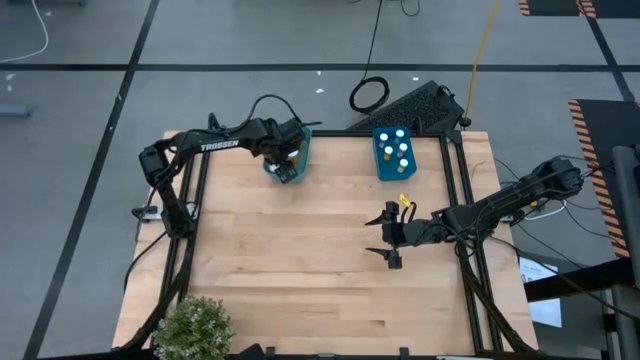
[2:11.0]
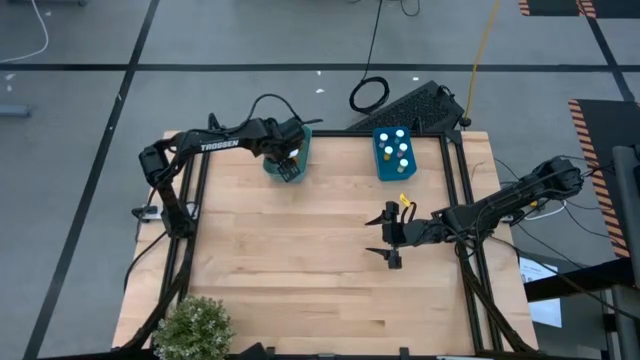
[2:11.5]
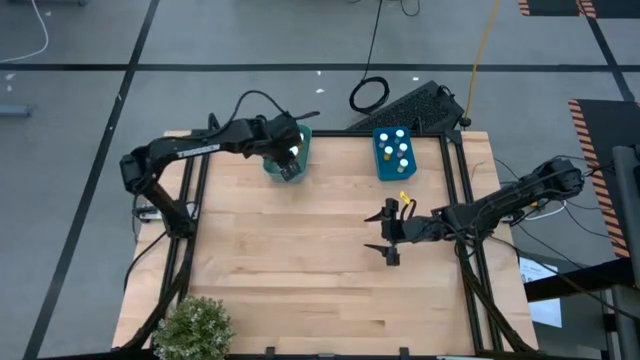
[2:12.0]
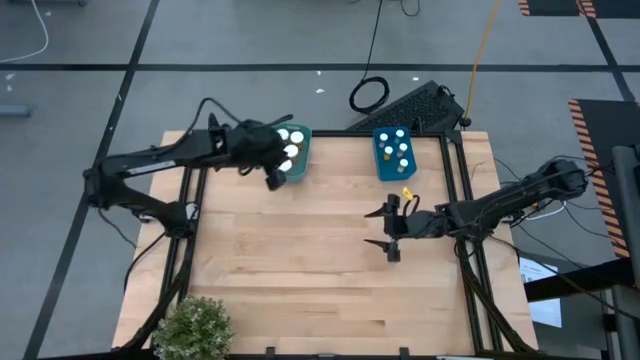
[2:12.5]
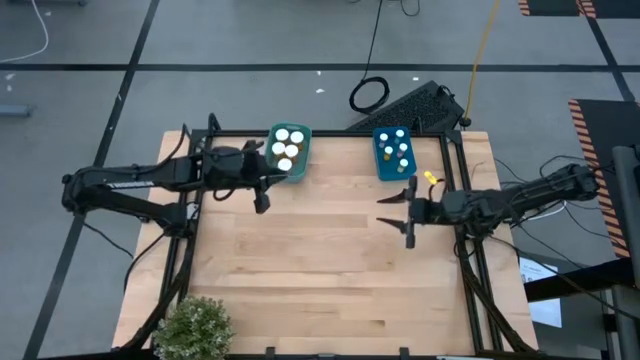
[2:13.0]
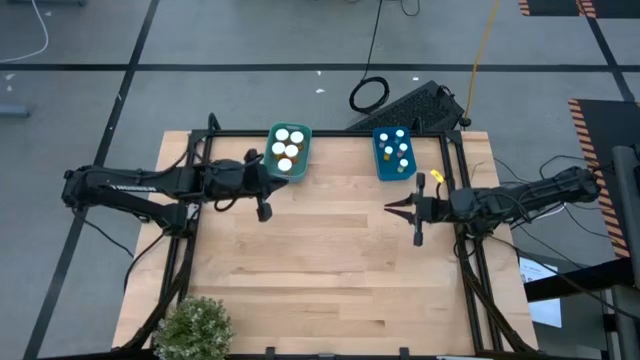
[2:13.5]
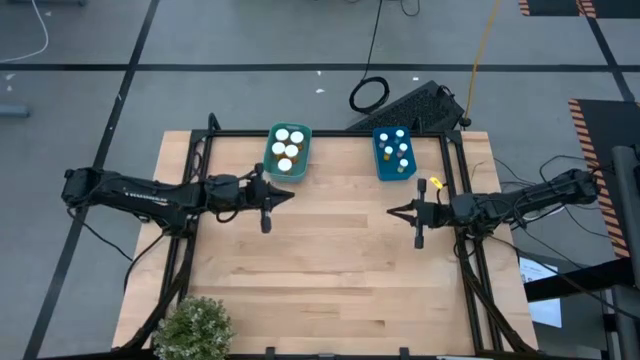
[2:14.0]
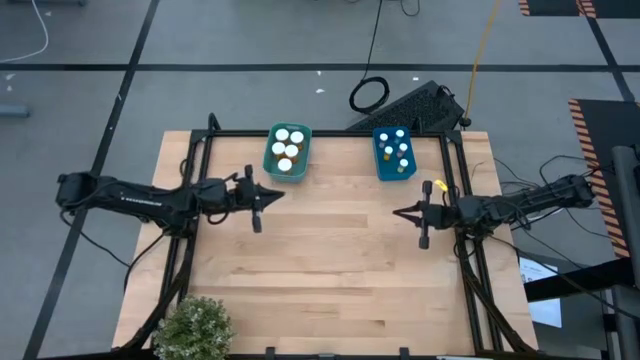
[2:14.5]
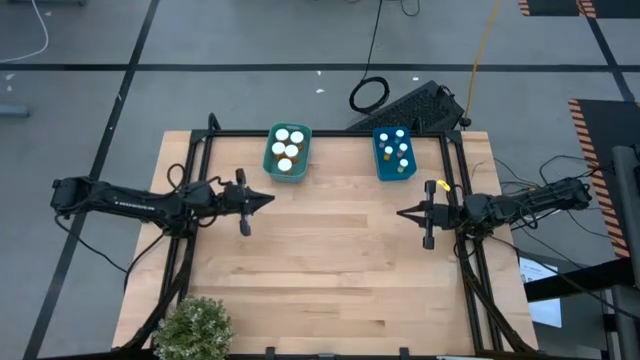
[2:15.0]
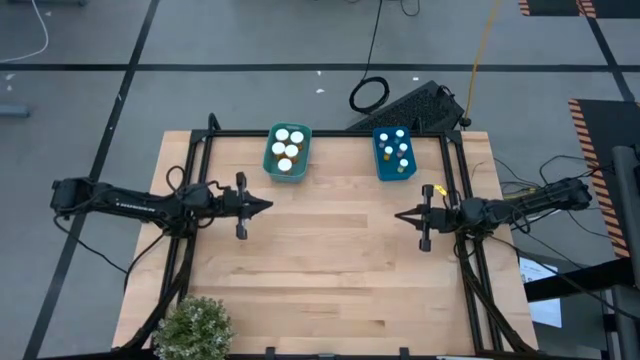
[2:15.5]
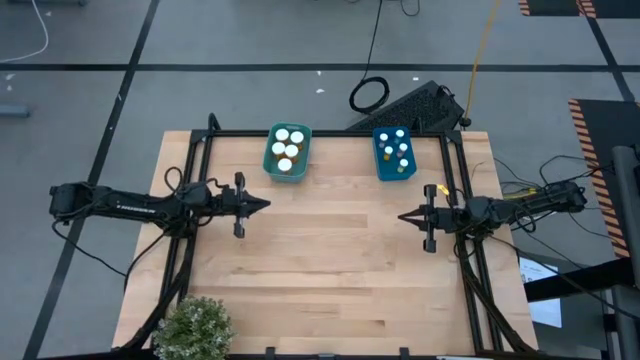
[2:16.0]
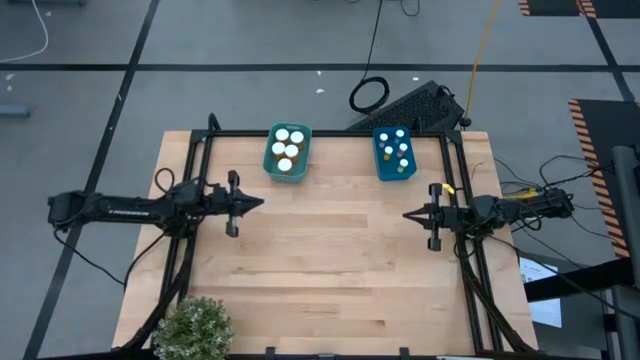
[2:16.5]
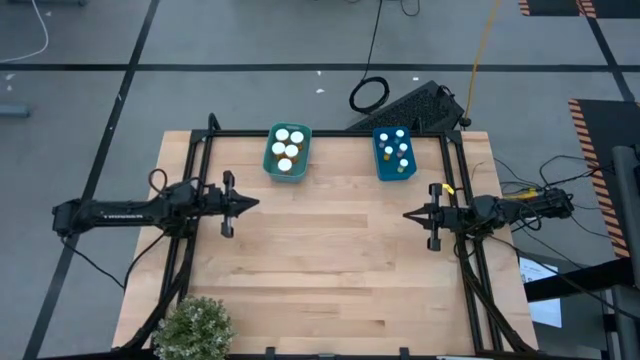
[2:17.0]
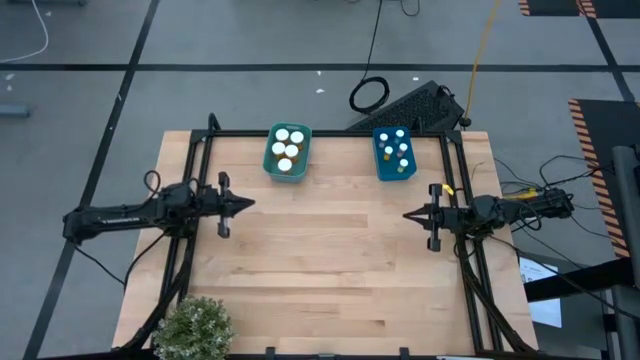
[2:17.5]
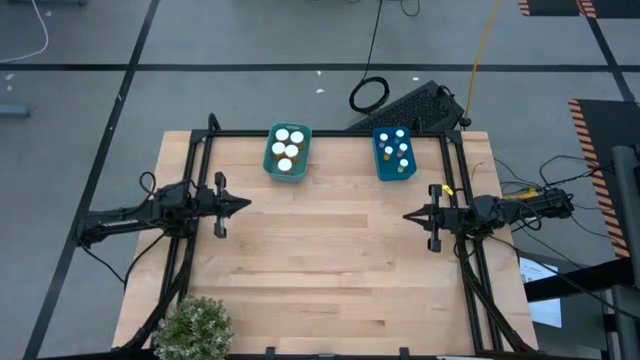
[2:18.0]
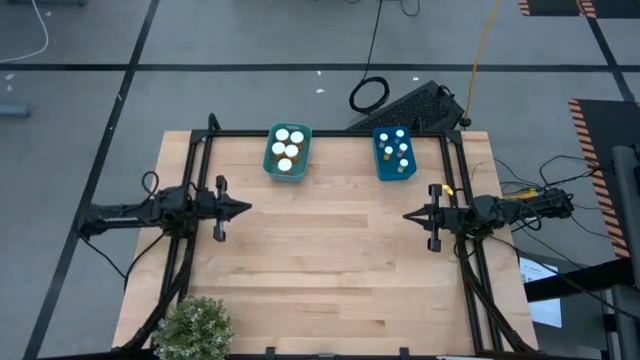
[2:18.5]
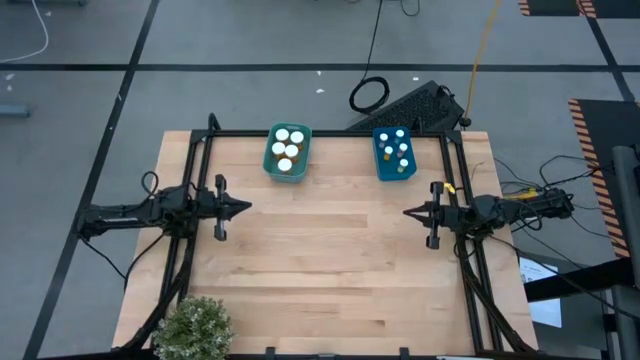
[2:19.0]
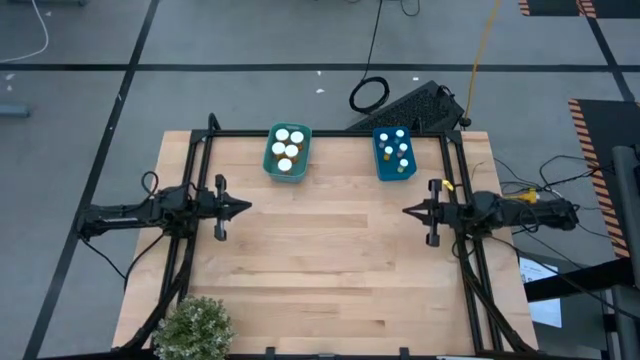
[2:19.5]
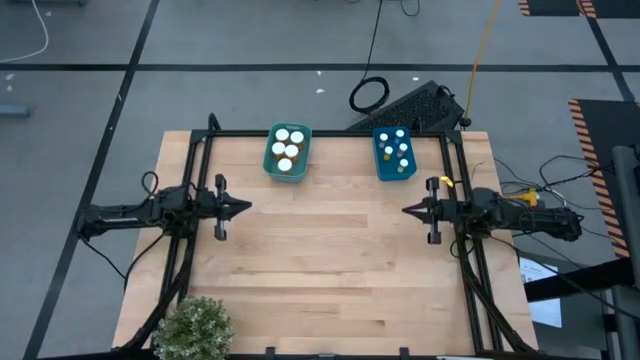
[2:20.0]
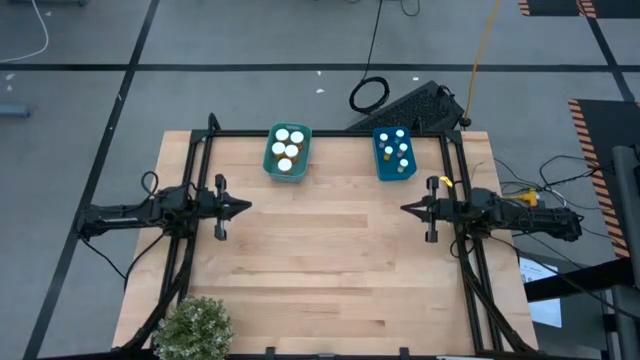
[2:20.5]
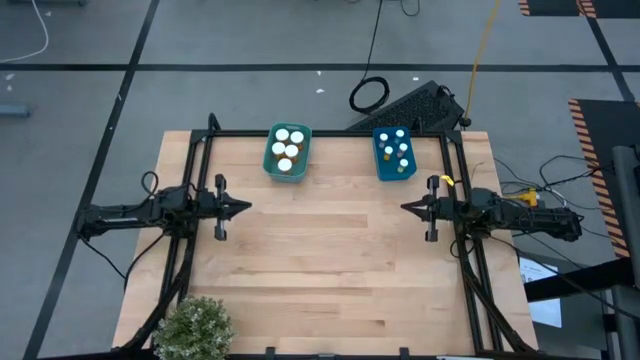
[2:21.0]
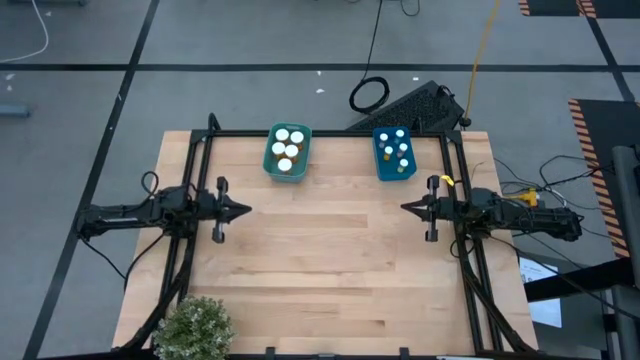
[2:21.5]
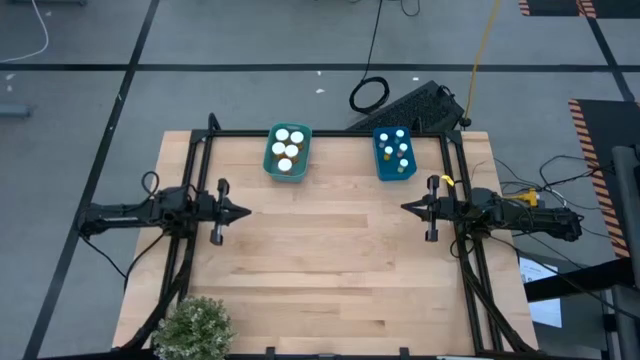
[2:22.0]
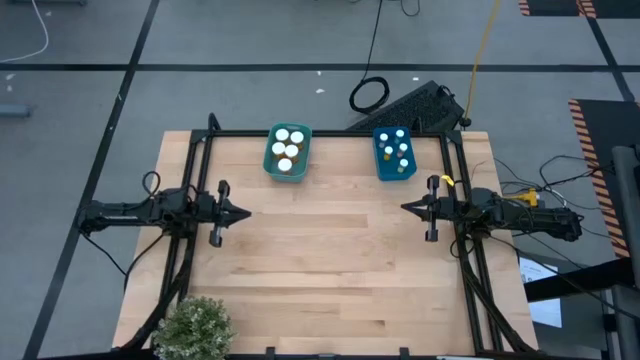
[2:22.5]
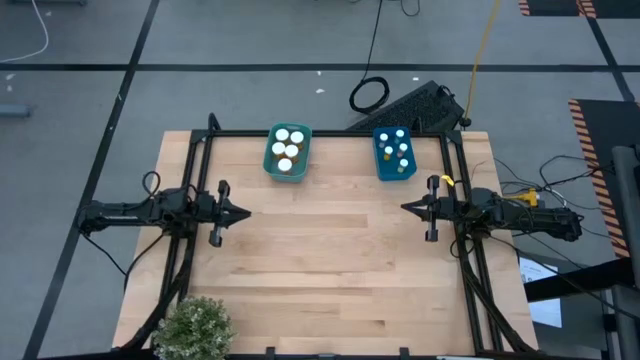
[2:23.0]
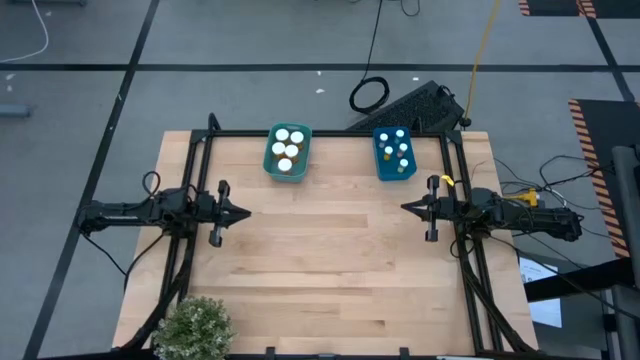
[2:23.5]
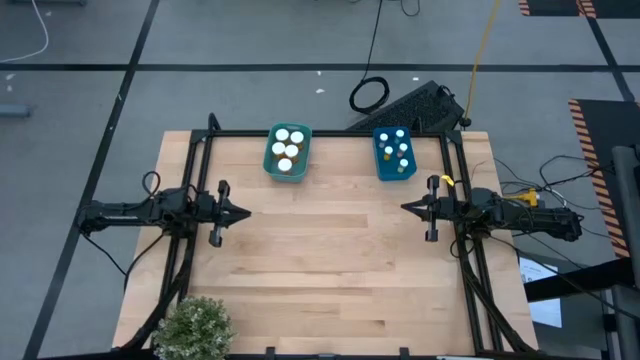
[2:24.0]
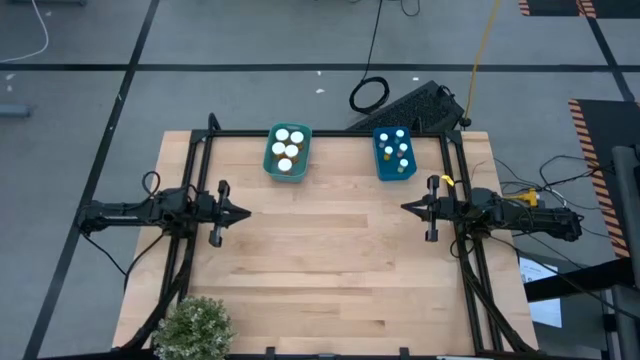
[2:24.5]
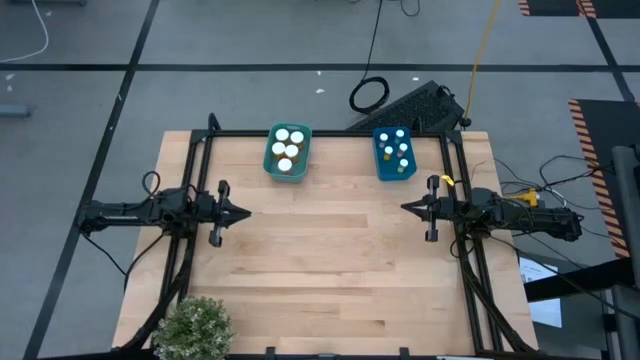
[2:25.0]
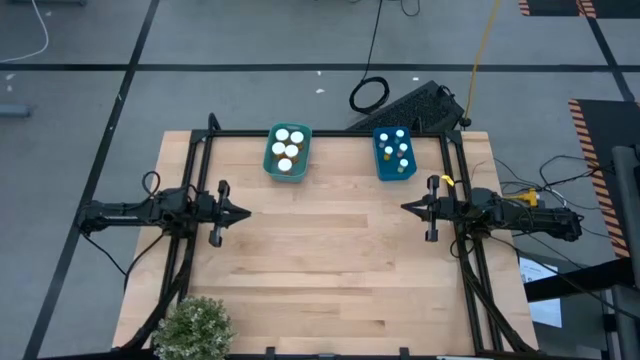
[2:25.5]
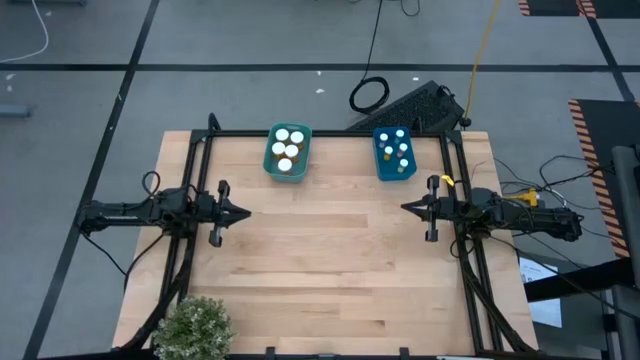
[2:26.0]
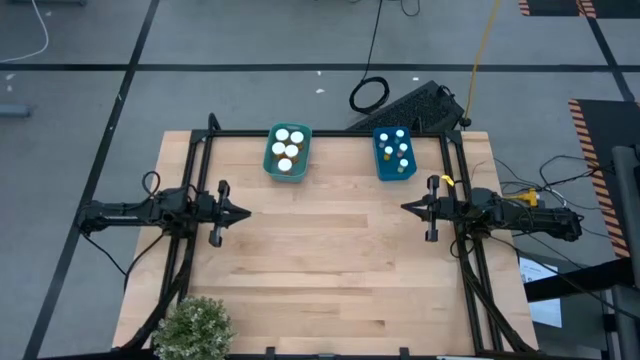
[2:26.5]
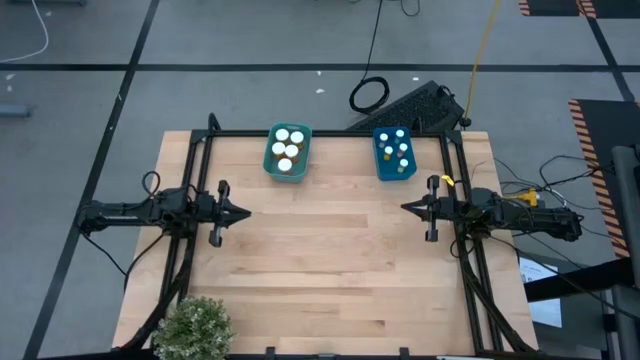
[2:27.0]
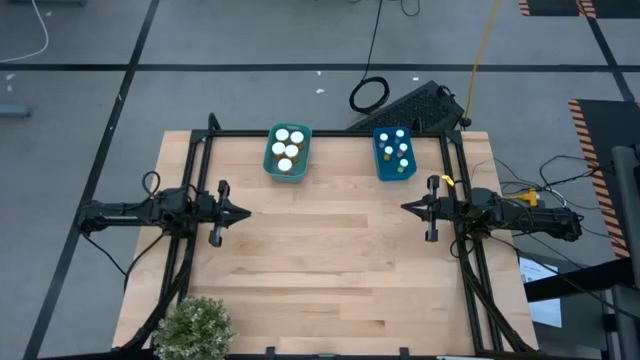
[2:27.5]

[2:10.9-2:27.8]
Task: Pick and place medicine bottles into bin by pill shape (circle, oval)
Return to Home Position

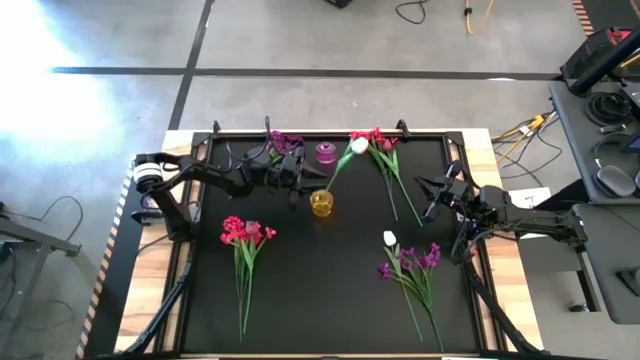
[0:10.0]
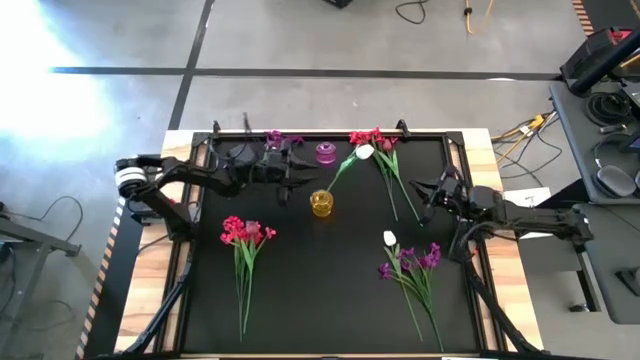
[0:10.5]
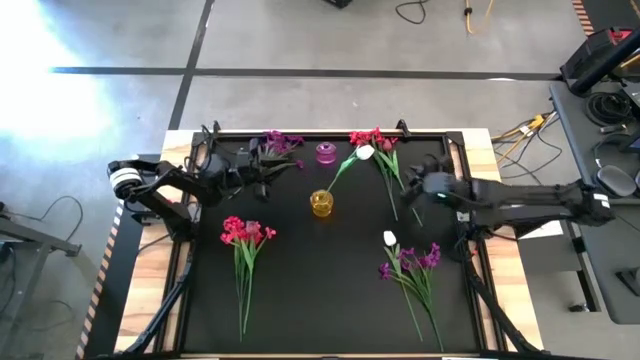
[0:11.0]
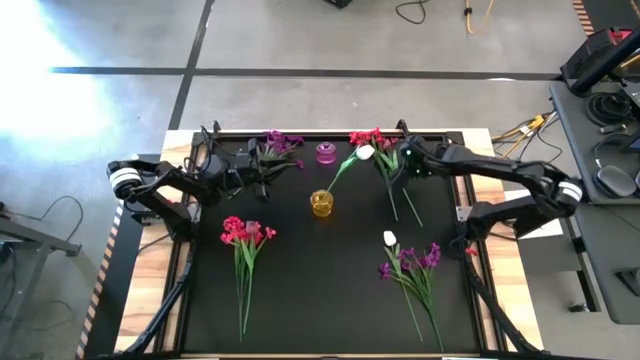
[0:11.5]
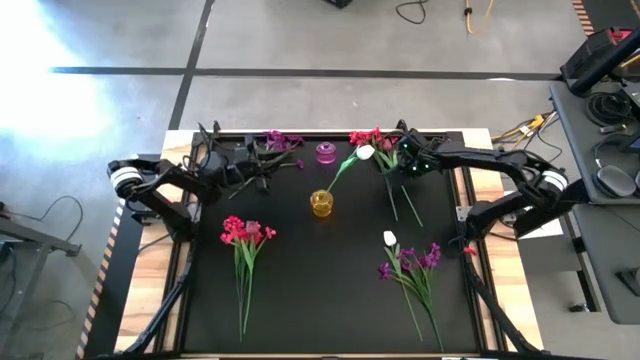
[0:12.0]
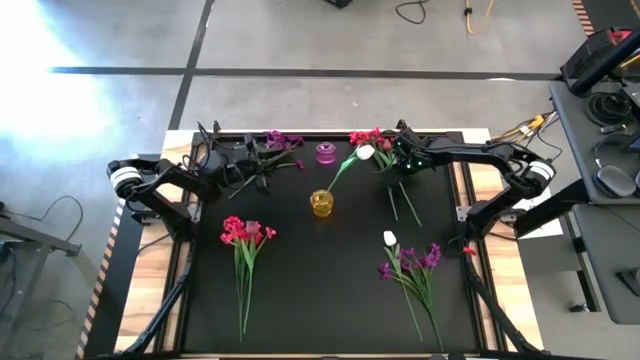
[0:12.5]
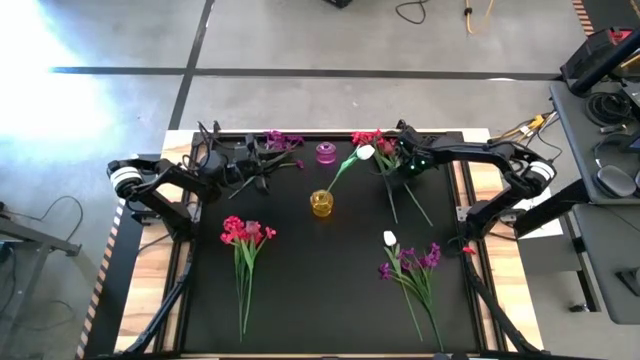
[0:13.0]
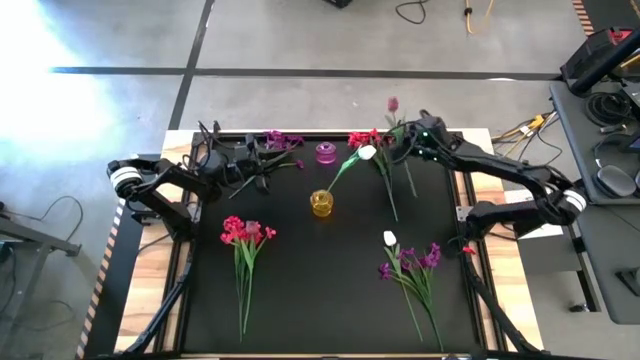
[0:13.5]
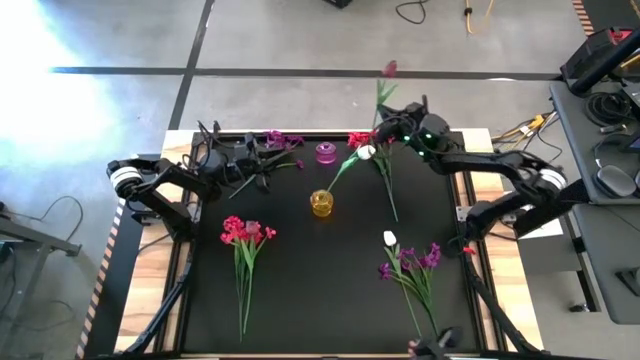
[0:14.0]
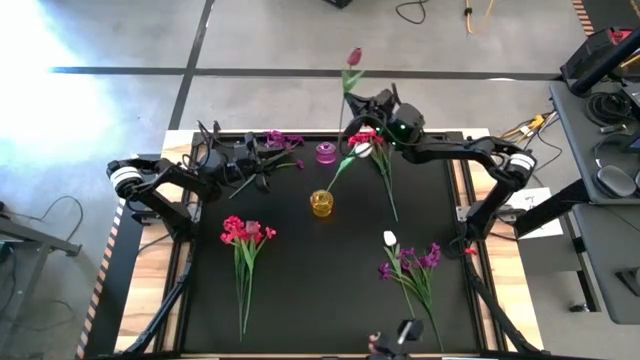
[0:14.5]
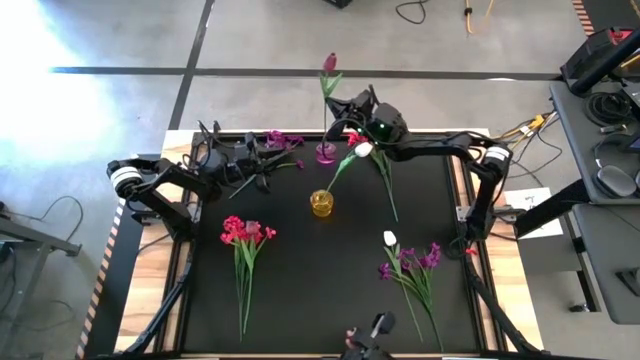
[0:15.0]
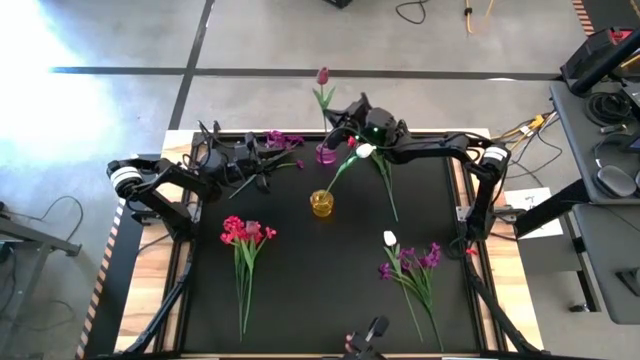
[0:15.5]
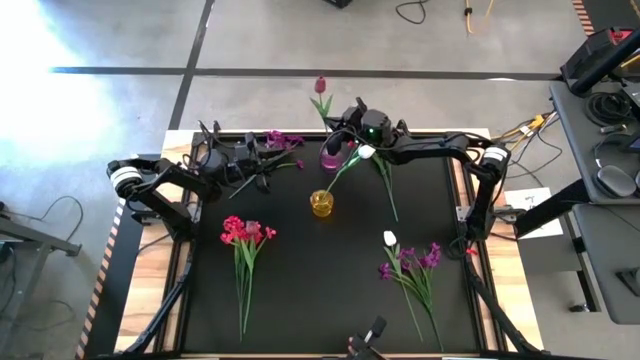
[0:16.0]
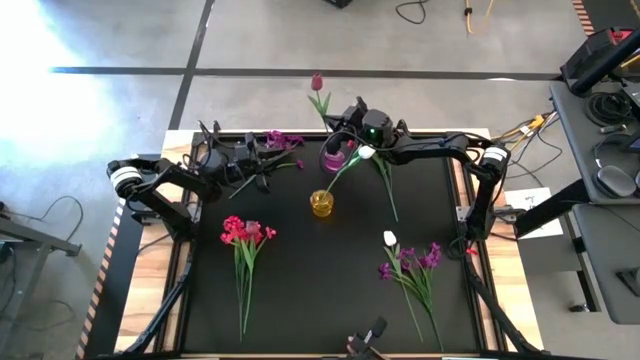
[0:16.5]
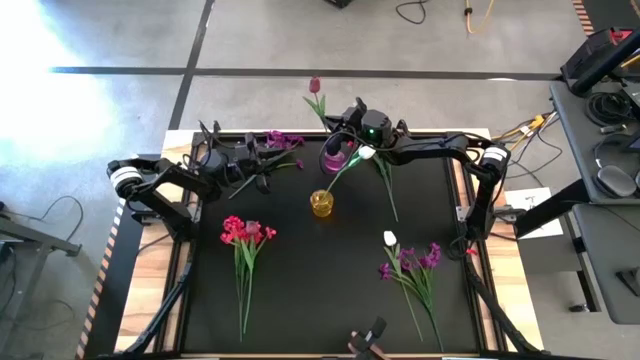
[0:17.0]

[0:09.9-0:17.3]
Task: Sort flowers into vase by color
Put the top red tulip into the violet vase
